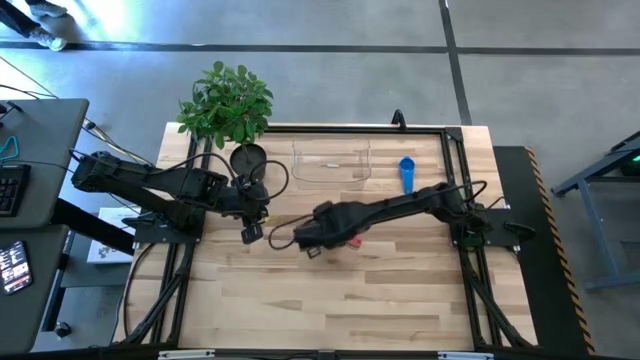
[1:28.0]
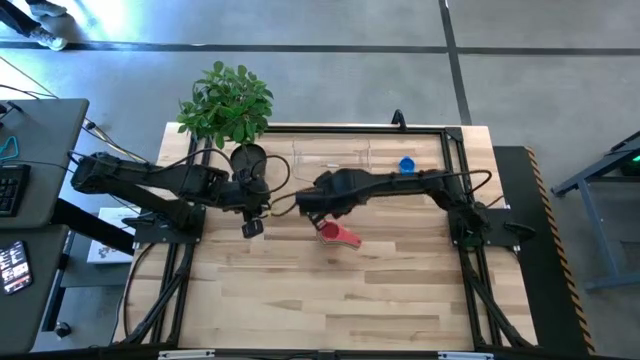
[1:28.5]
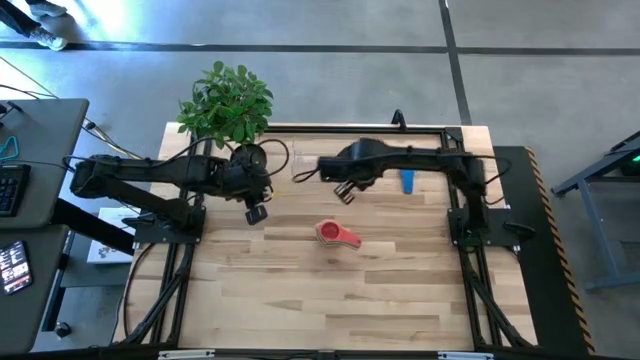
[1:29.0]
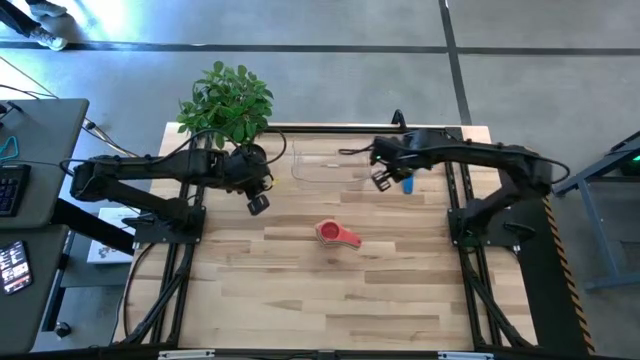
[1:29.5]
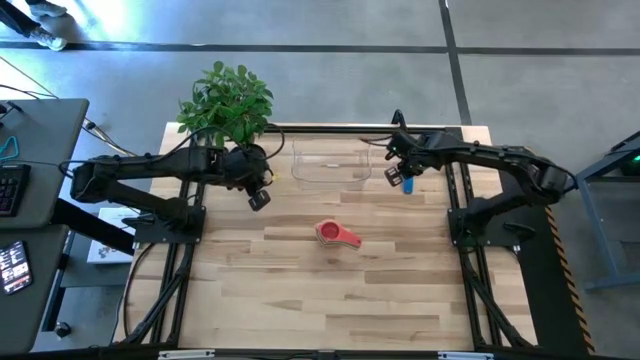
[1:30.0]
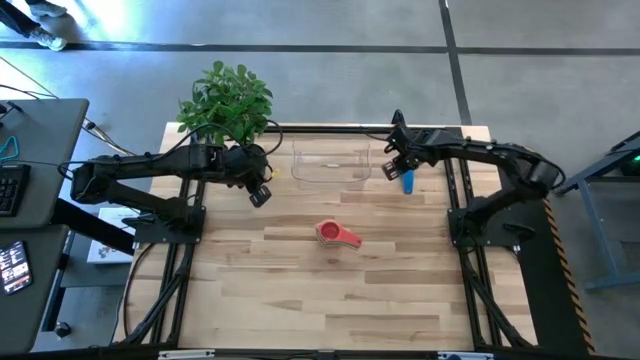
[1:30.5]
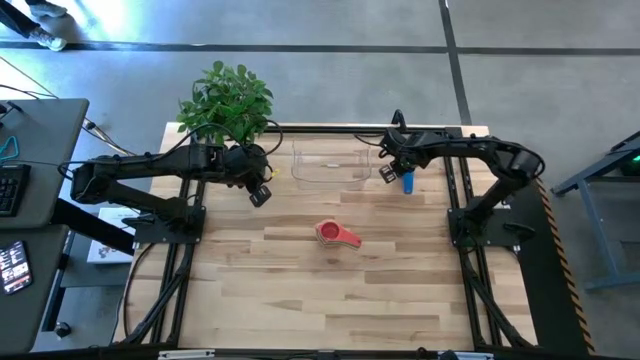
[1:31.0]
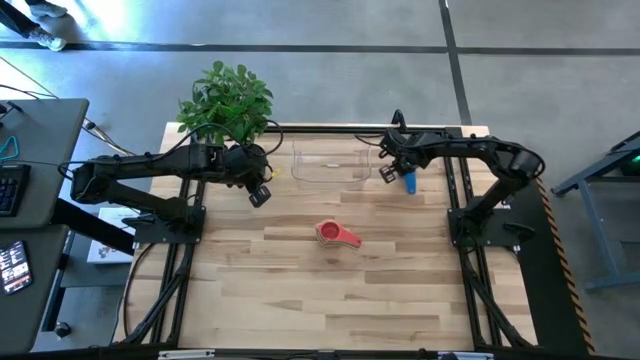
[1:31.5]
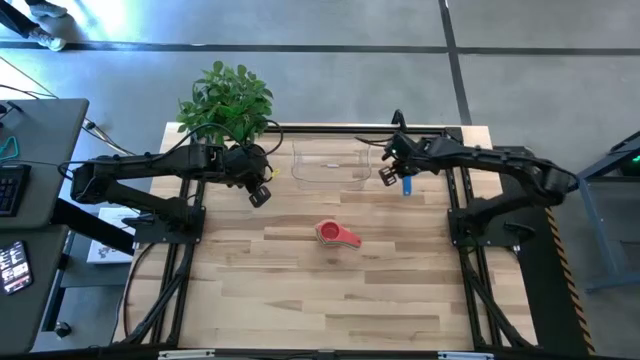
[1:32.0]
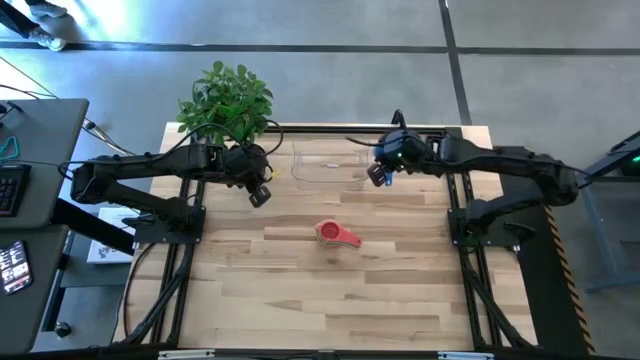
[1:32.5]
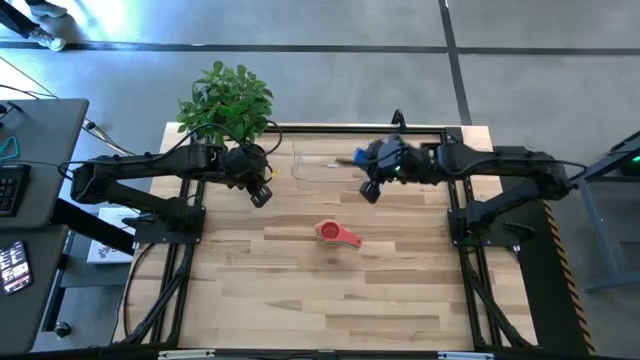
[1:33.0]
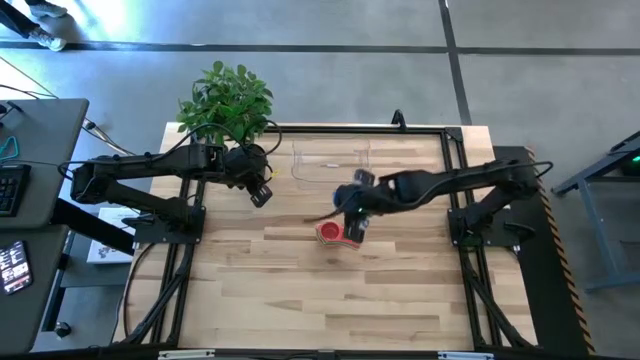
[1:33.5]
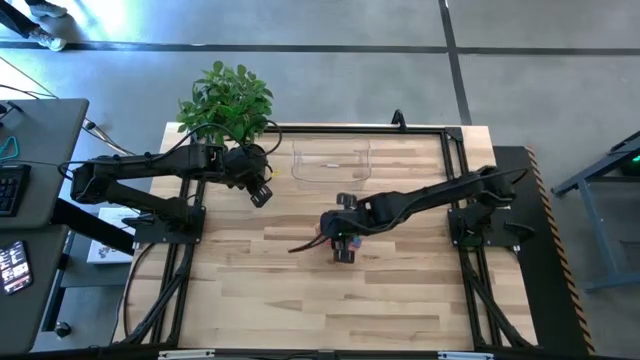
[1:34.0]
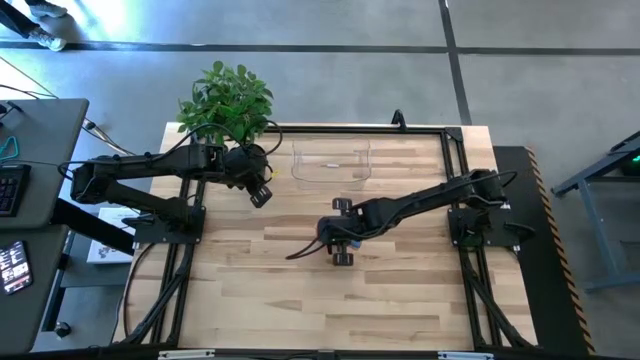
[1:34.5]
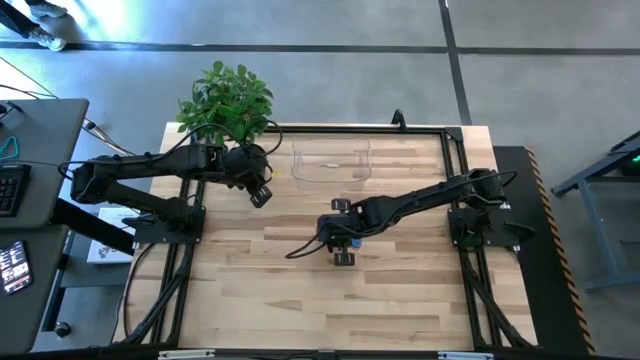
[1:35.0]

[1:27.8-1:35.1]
Task: Nest measuring cups in basket
Stack the blue measuring cup on top of the red measuring cup

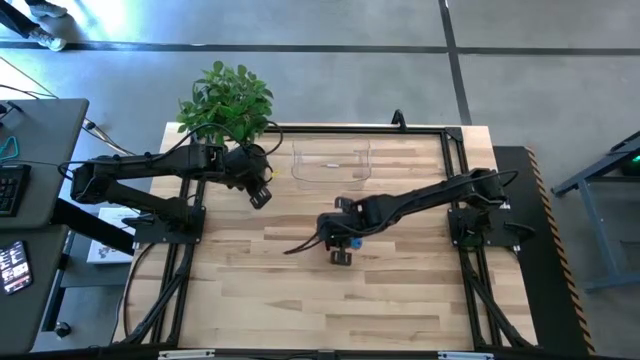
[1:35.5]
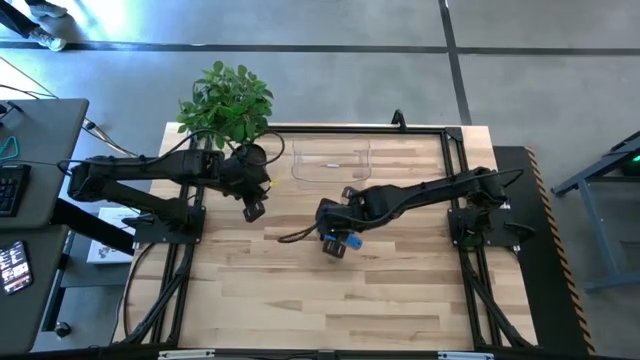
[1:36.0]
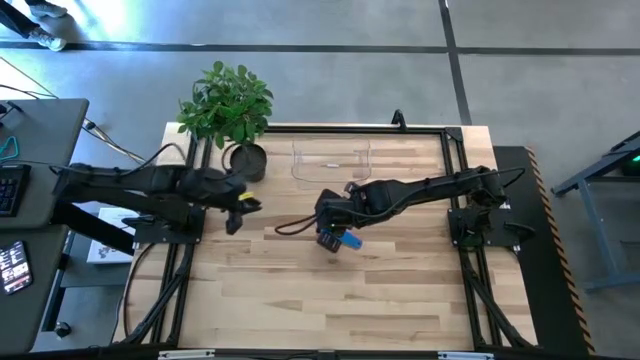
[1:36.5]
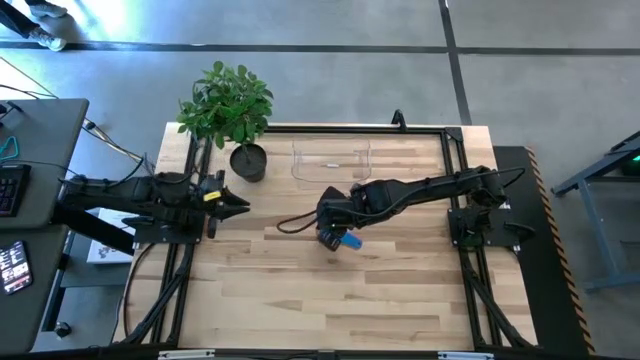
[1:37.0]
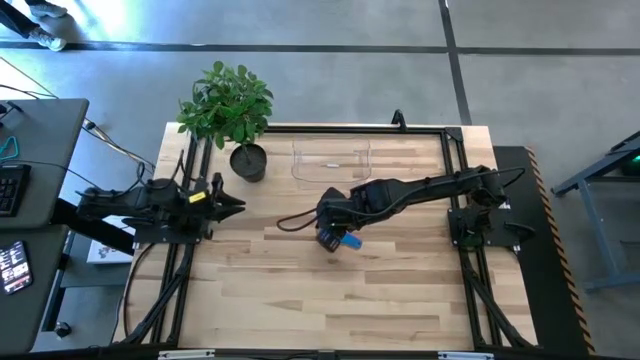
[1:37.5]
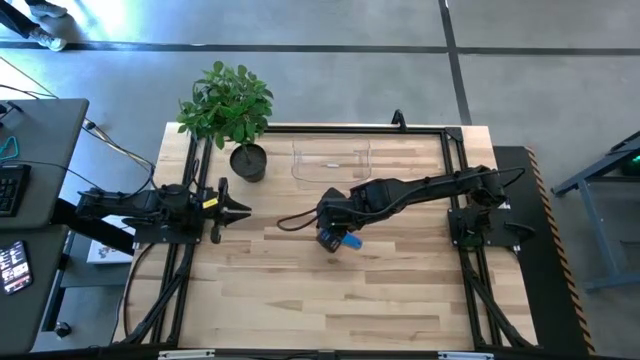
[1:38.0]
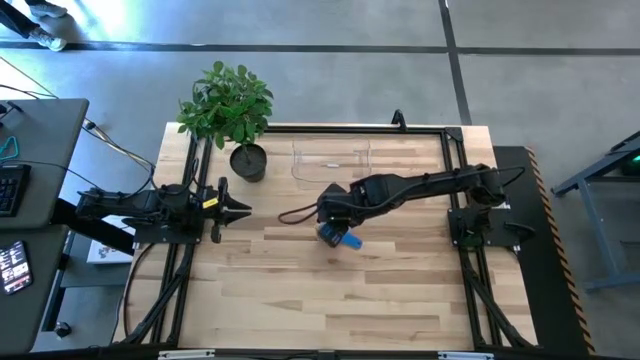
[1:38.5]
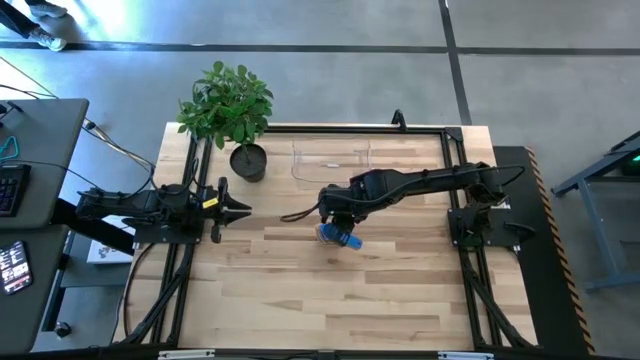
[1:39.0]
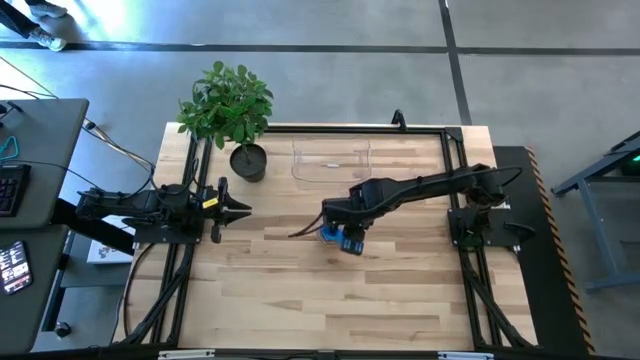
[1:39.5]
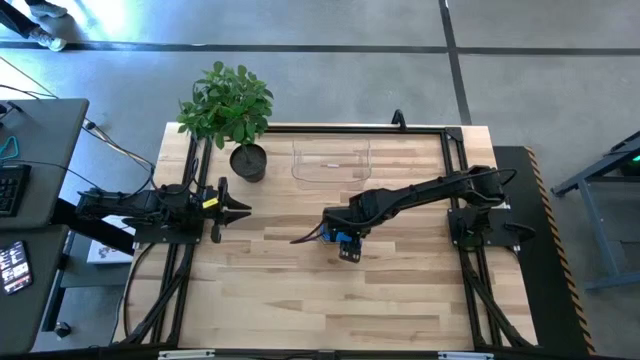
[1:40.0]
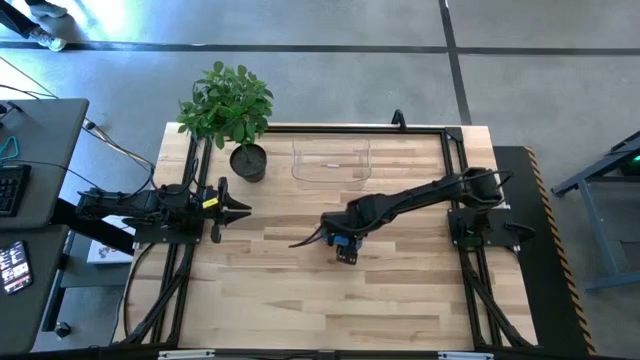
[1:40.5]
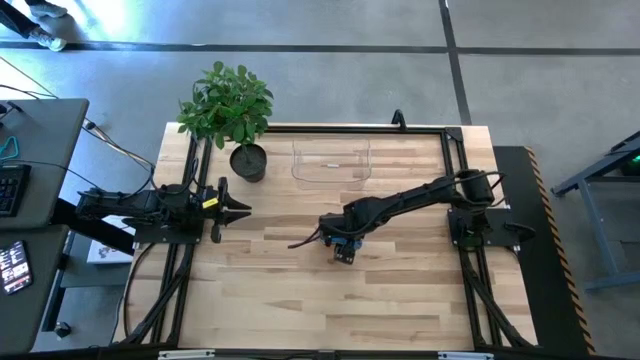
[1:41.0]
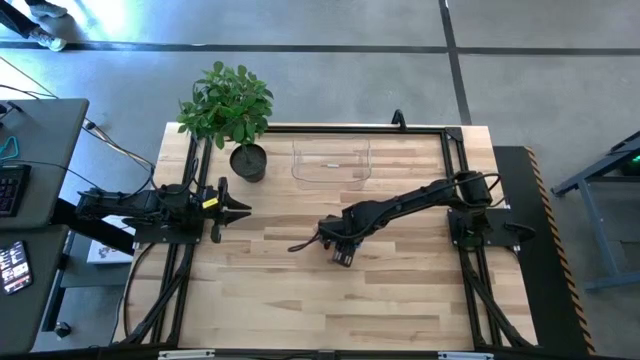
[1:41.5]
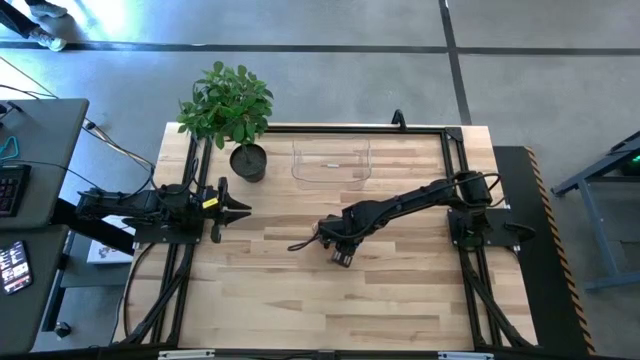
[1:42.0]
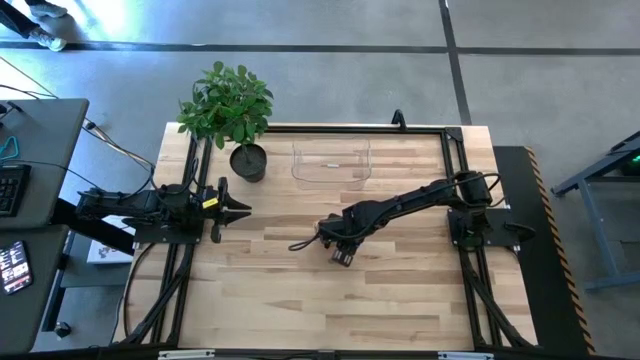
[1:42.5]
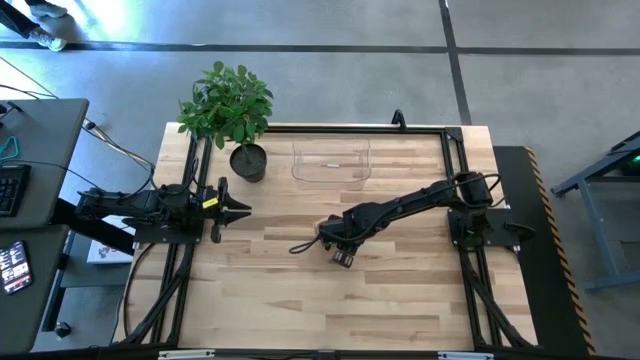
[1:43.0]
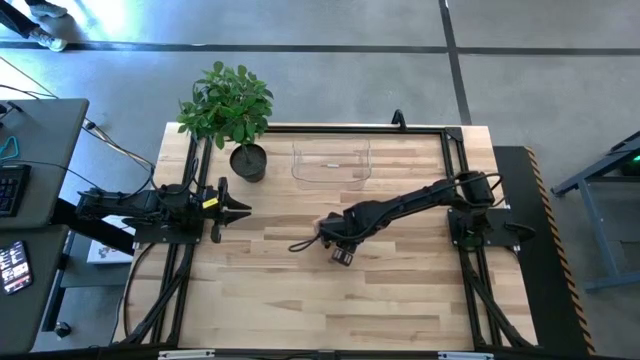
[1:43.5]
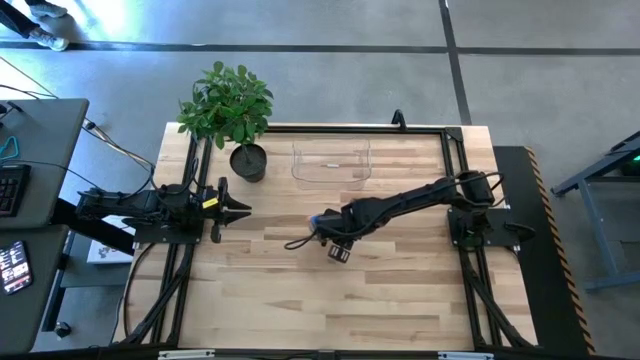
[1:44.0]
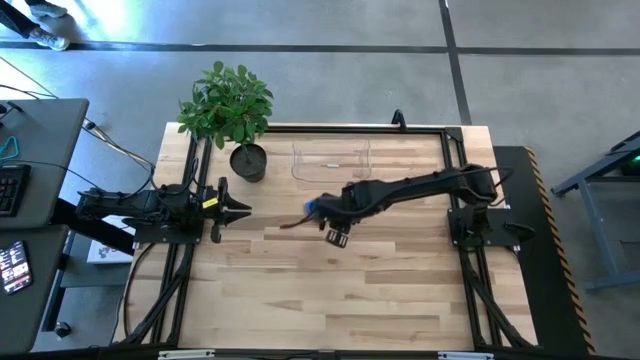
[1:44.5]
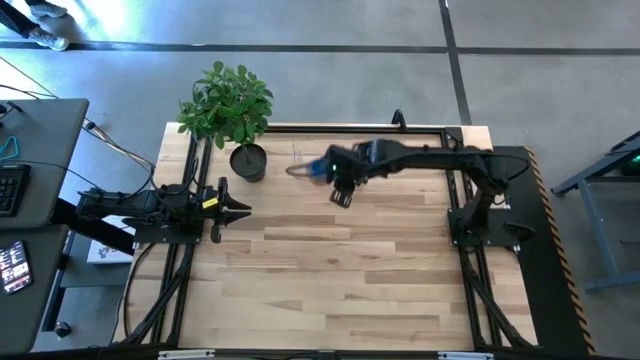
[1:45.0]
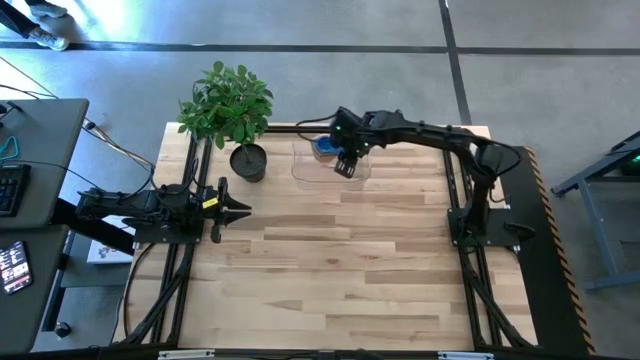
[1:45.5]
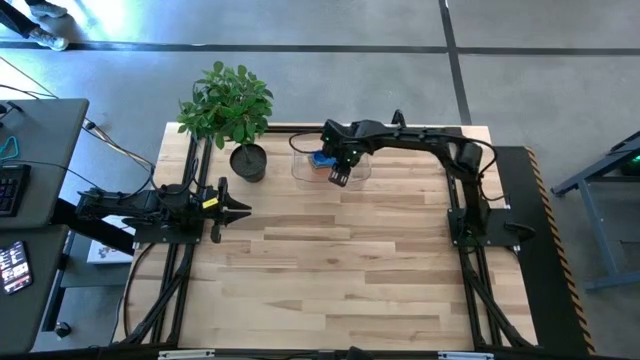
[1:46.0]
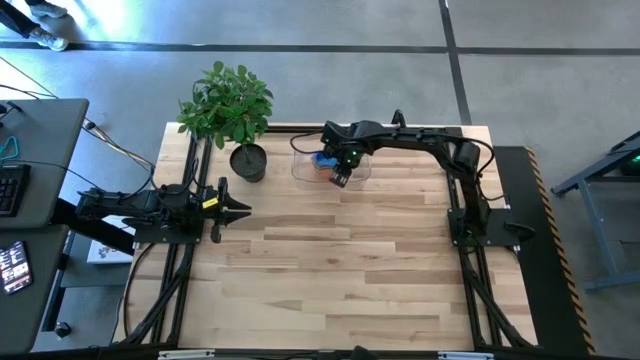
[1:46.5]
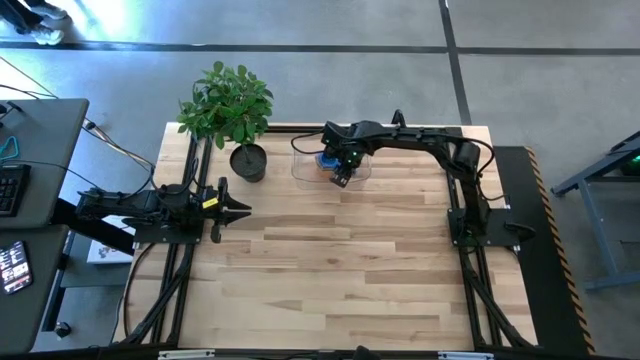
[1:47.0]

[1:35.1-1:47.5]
Put the stacked measuring cups into the transparent bin

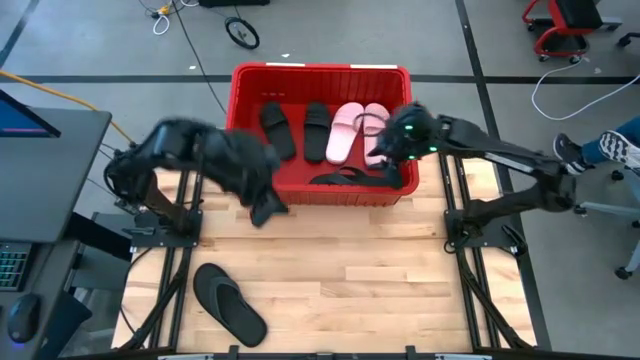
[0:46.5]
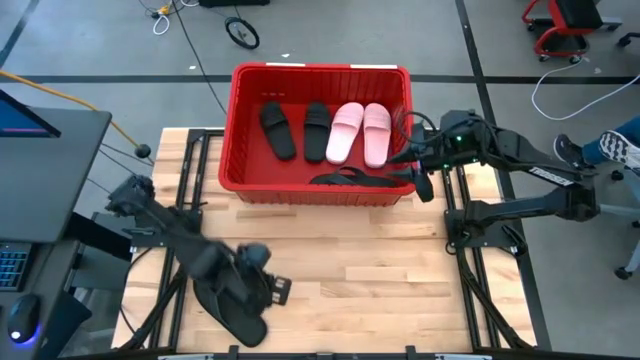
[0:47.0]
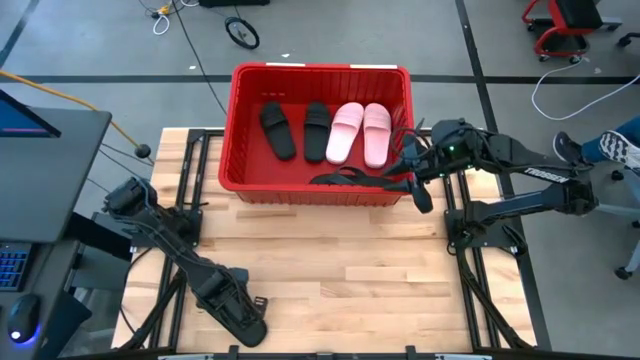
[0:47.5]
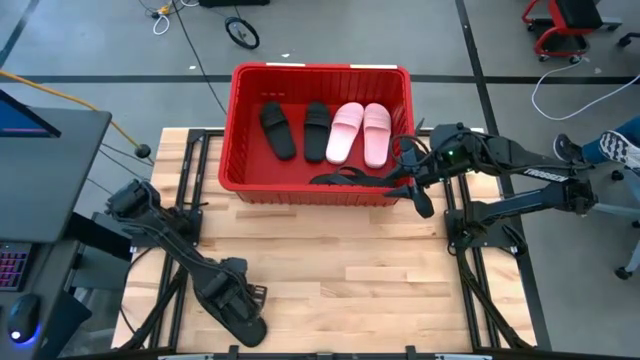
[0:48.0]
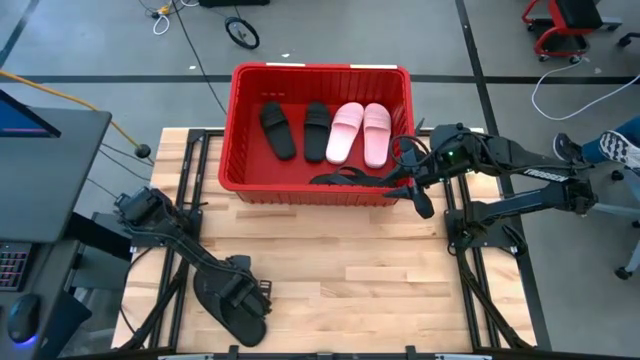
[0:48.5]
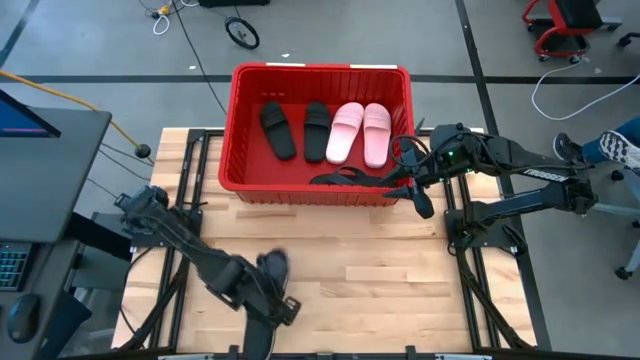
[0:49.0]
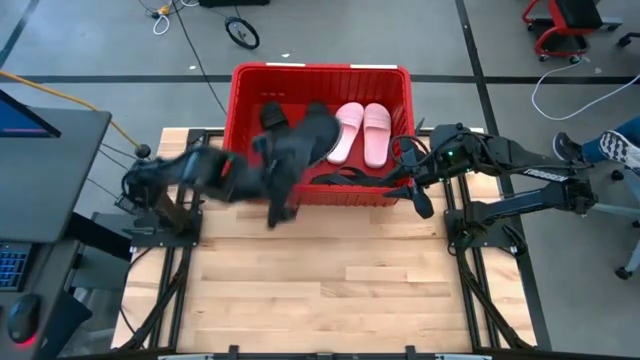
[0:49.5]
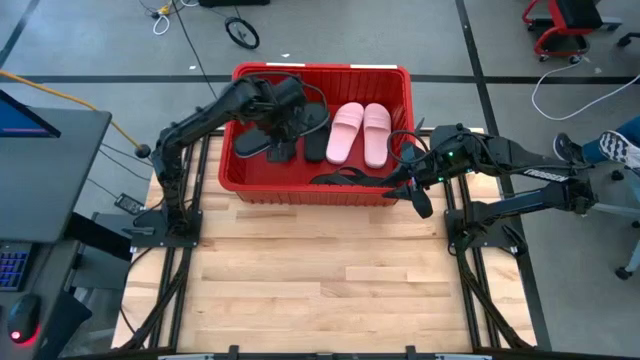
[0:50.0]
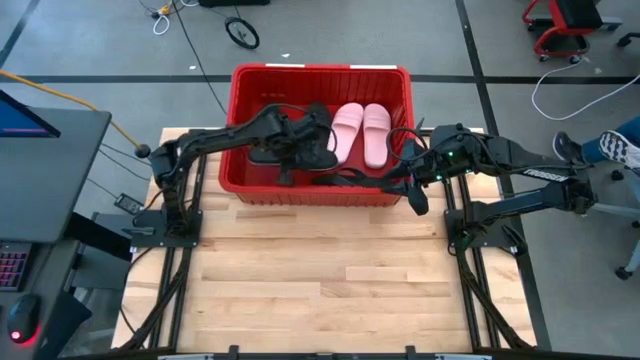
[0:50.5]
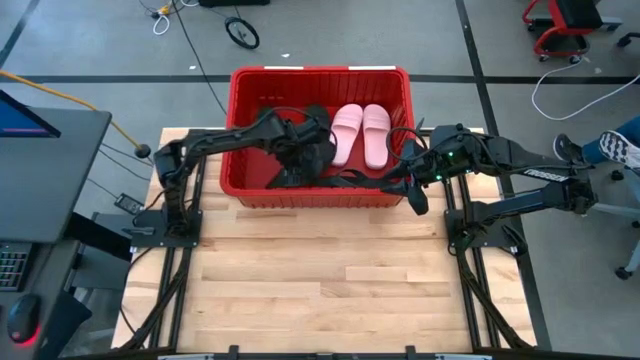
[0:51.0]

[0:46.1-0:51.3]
Task: Pick and place slides into bin
Put the black slipper into the red bin
